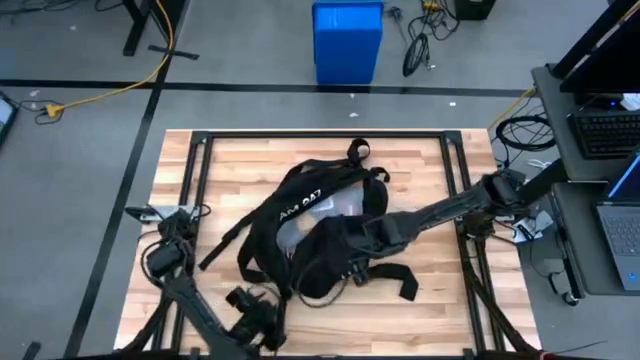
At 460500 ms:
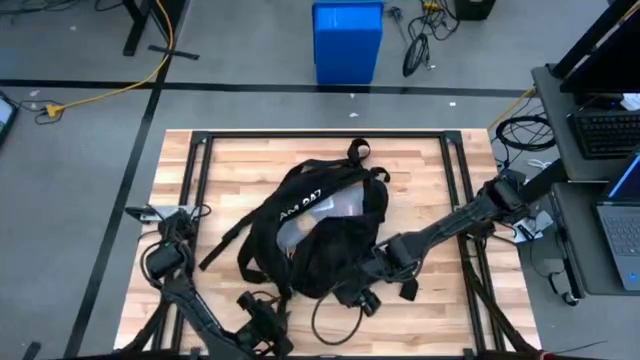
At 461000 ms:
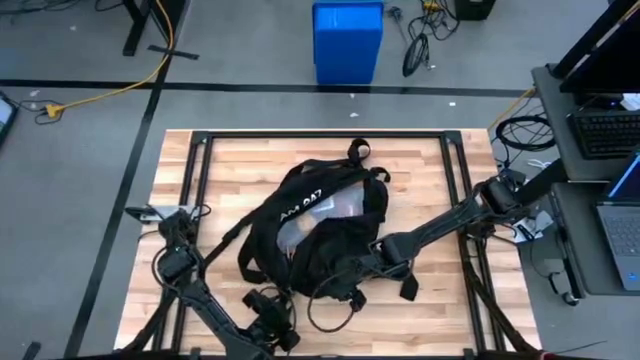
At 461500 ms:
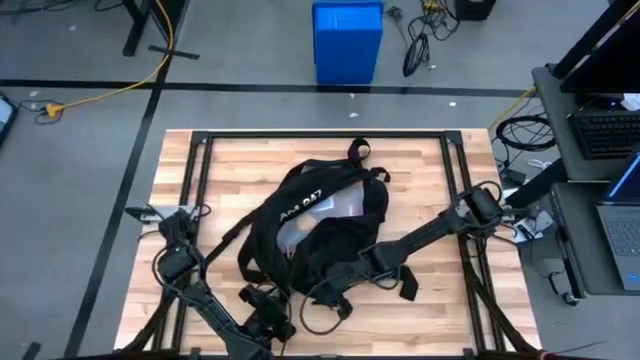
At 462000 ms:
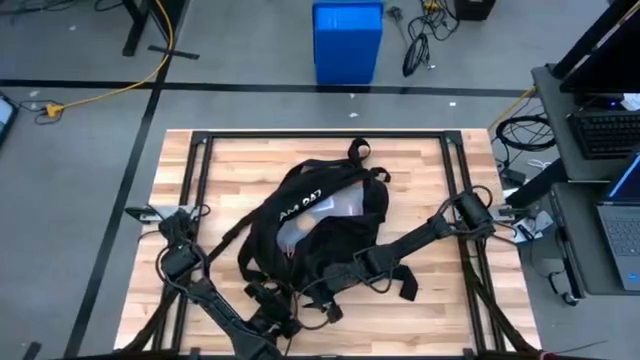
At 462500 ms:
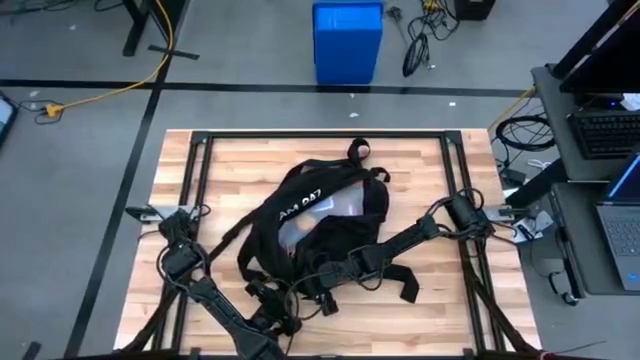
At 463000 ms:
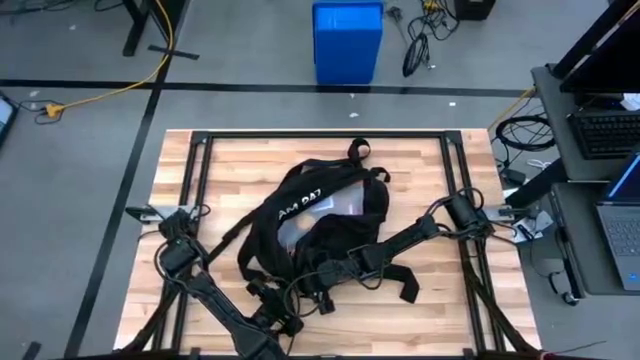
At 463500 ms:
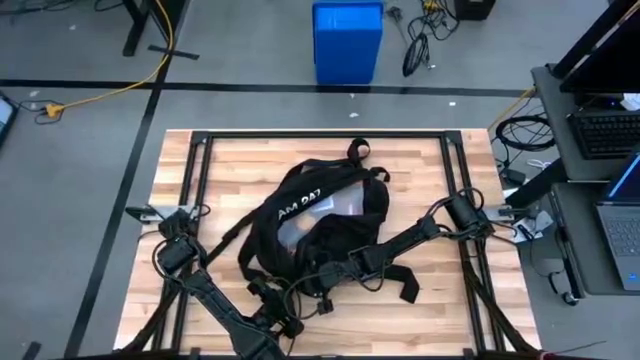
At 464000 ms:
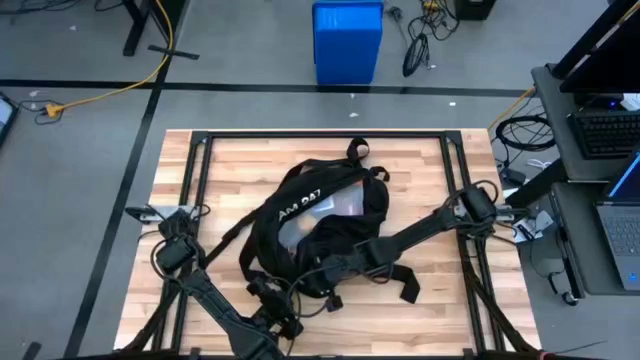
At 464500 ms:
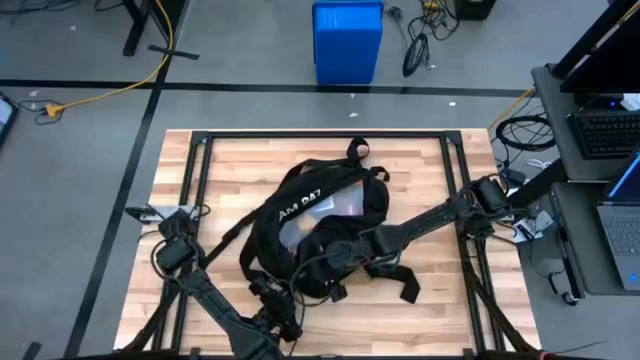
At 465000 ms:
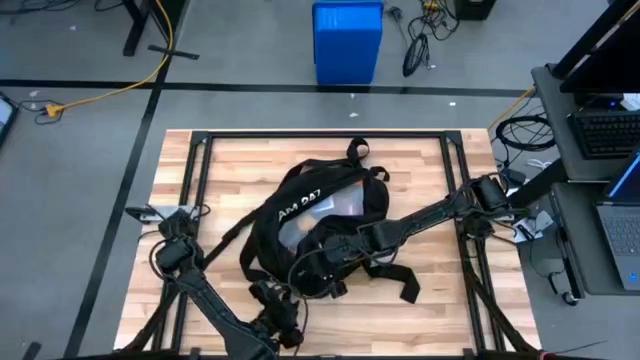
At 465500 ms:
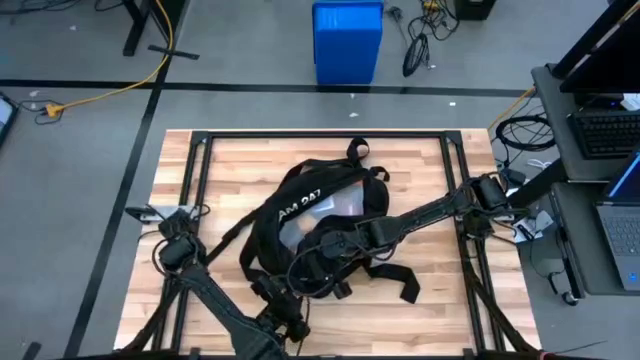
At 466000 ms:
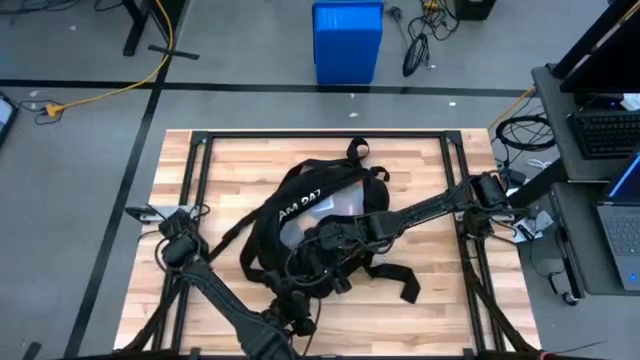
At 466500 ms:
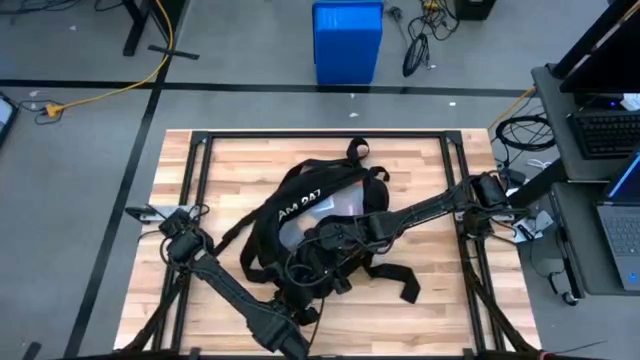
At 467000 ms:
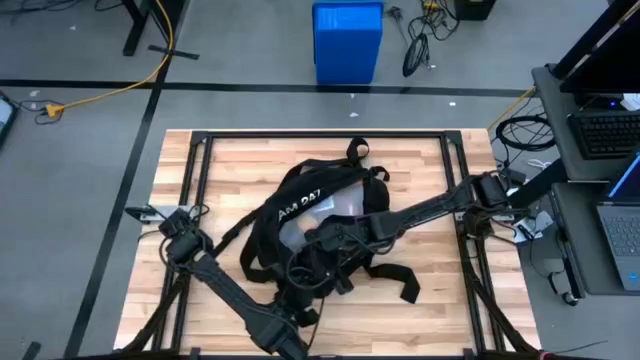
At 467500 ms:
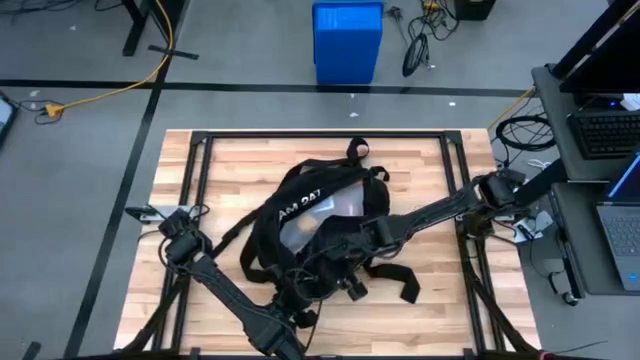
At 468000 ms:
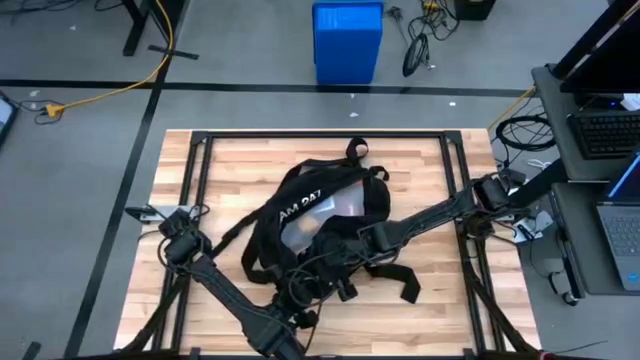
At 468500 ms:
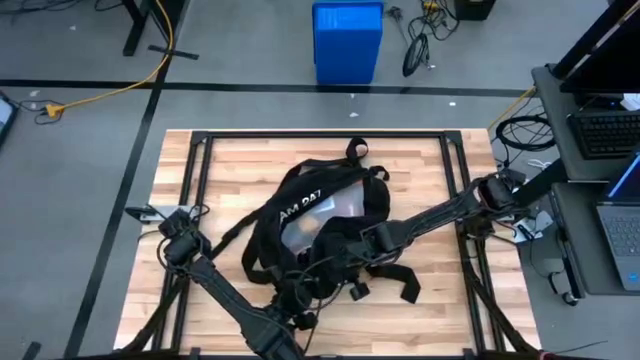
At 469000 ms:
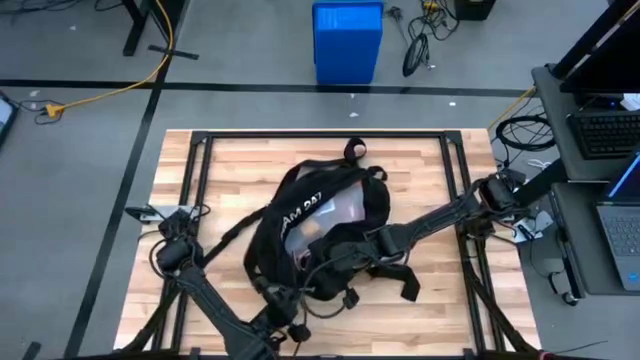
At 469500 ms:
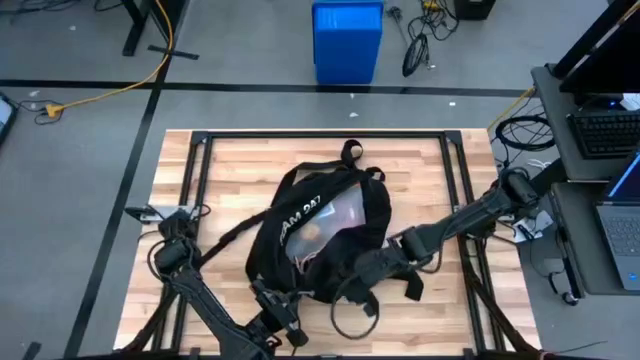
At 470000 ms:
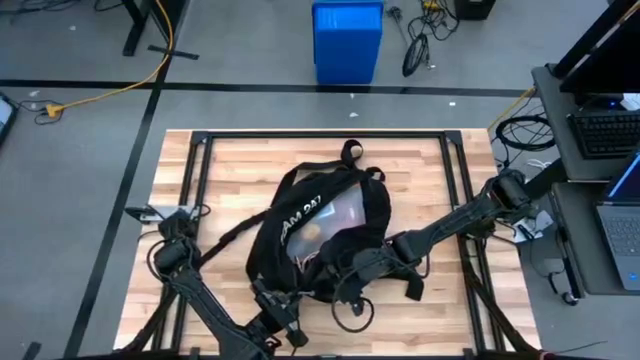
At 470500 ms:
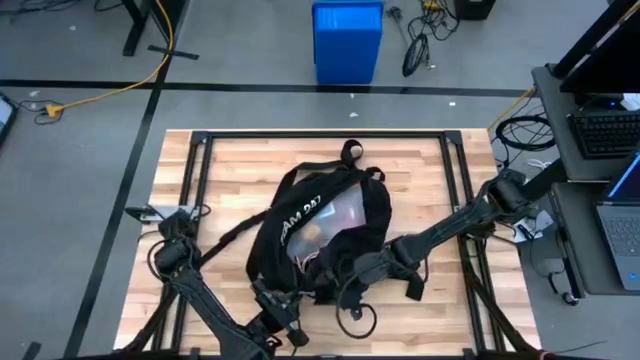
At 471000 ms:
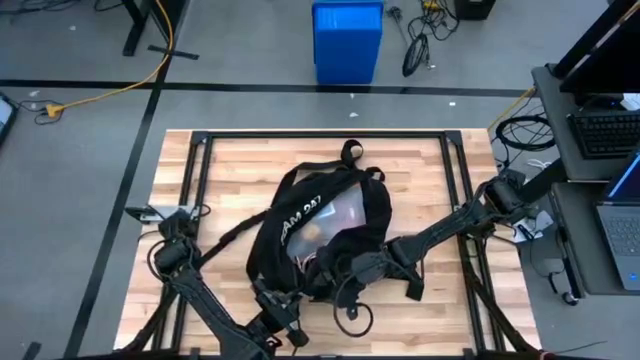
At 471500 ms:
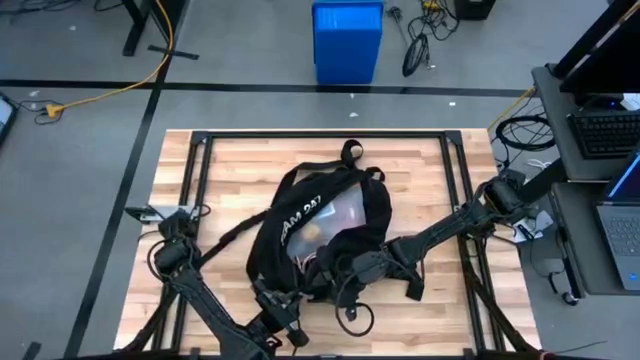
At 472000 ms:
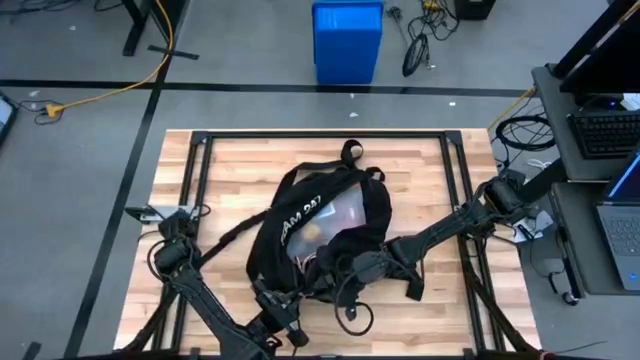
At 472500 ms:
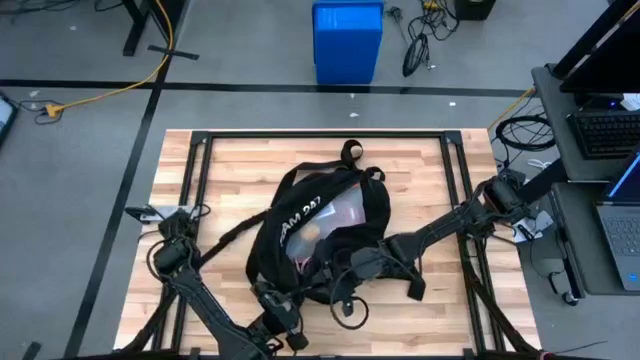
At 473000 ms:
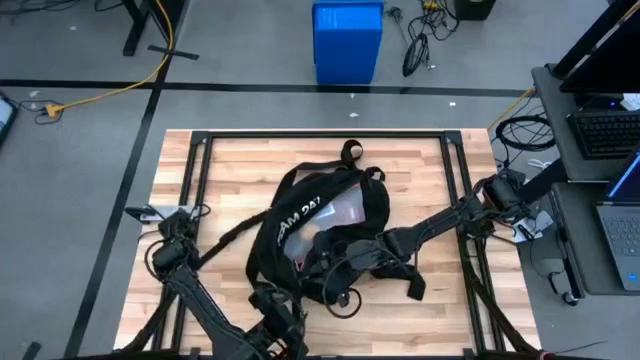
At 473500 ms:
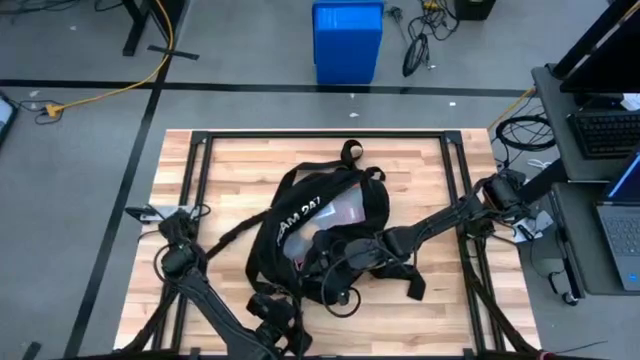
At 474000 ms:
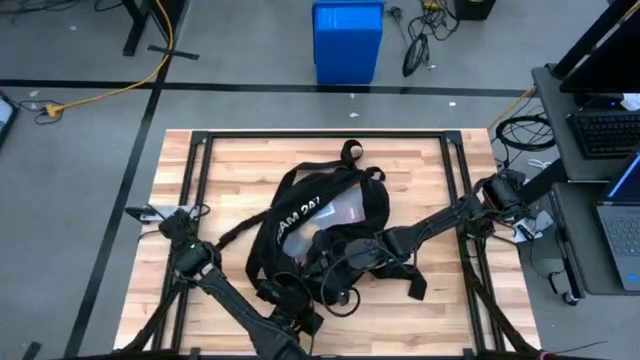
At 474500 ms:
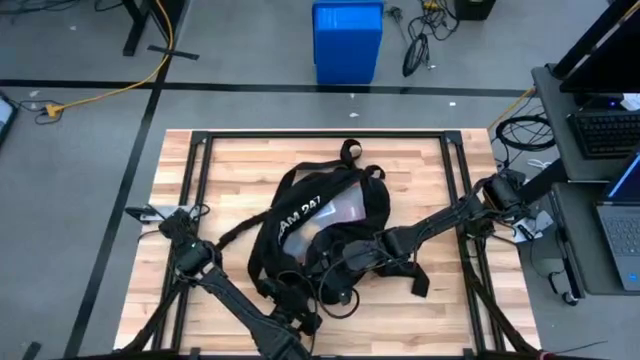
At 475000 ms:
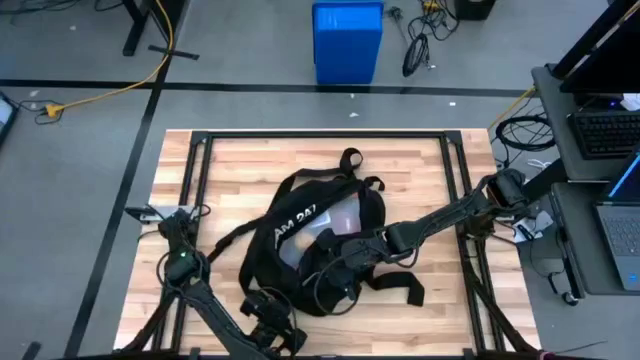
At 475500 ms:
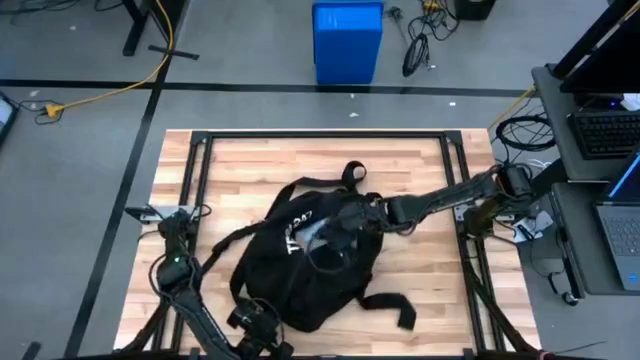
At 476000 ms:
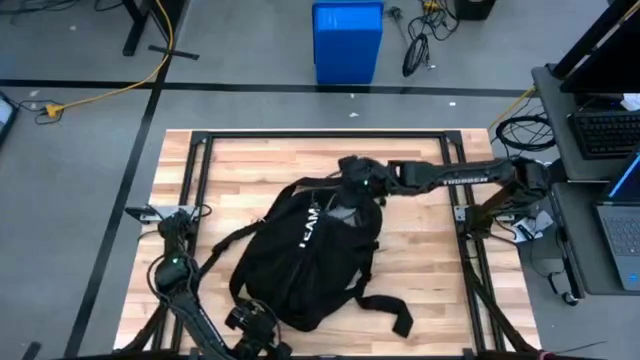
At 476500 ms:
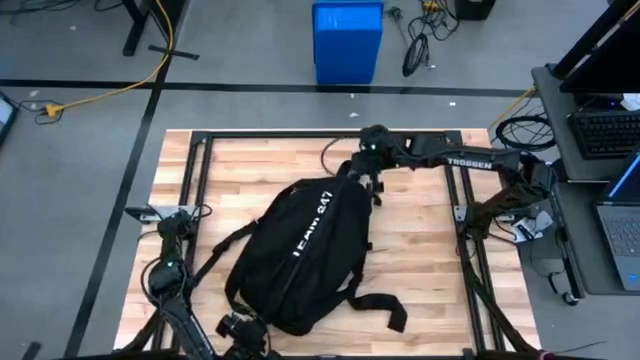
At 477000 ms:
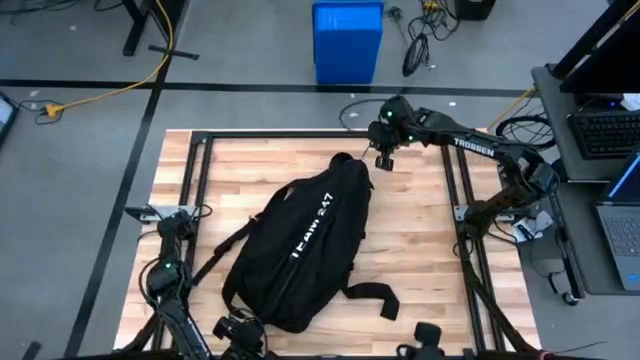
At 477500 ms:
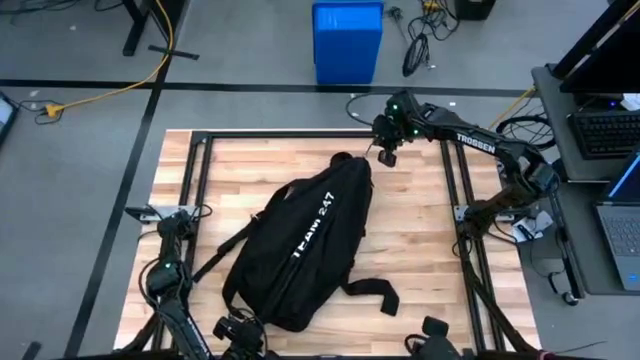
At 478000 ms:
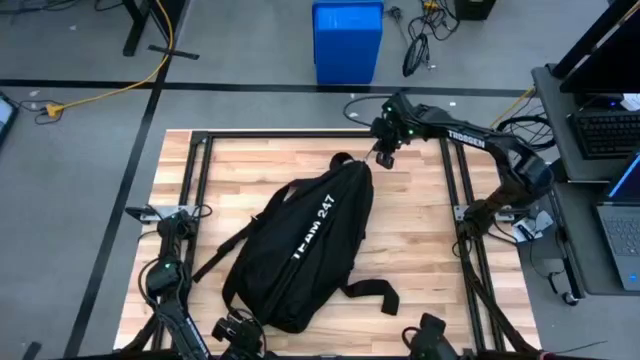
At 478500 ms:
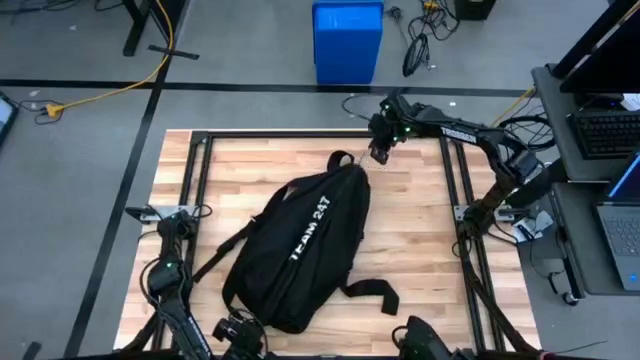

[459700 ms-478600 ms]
Task: Unpack backpack
Close the black backpack

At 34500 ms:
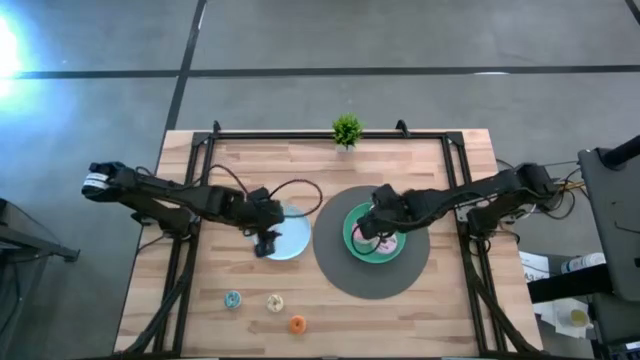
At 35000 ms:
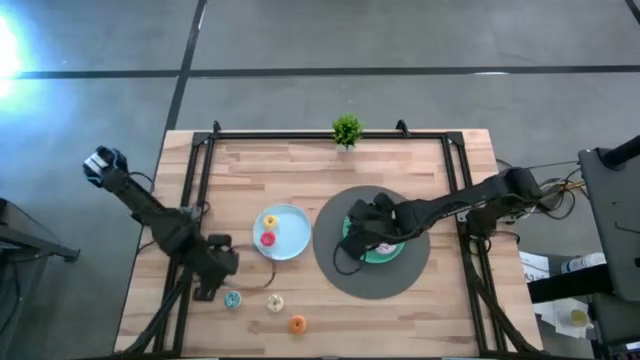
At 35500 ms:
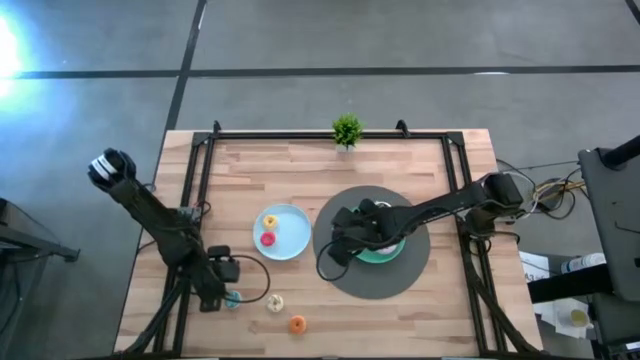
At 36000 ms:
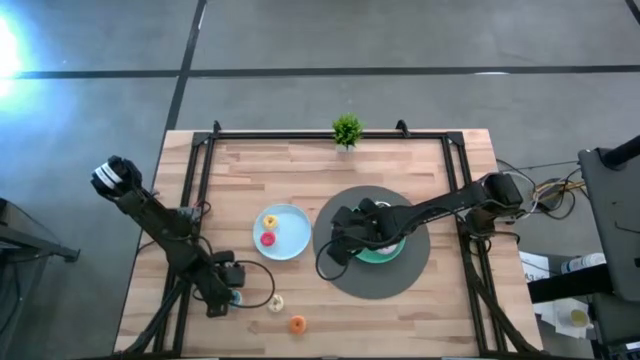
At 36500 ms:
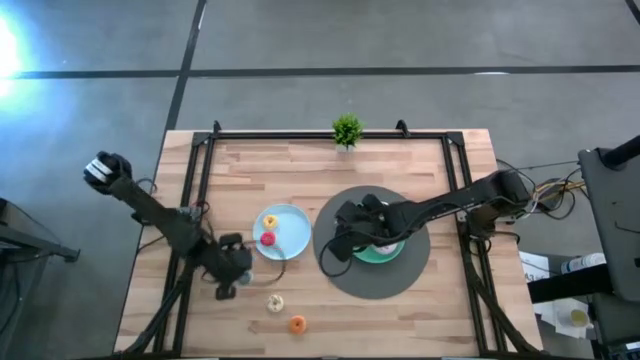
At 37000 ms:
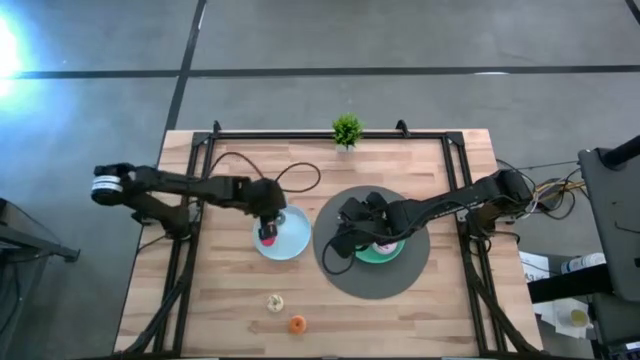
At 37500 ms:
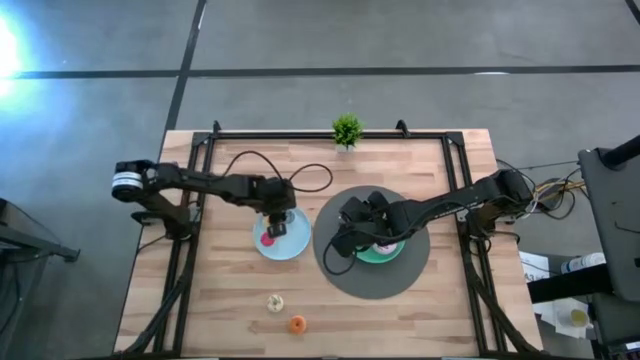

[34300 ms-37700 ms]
Task: Pick & Place donuts
Put the small blue donut on the blue plate
